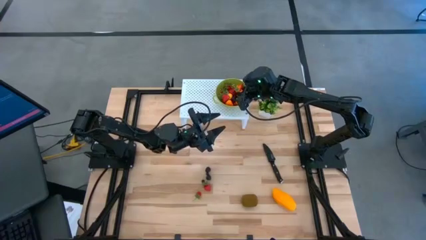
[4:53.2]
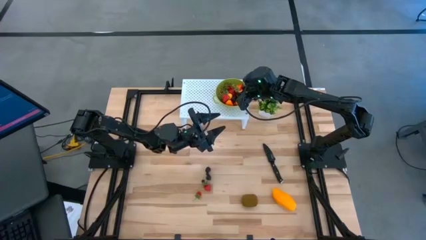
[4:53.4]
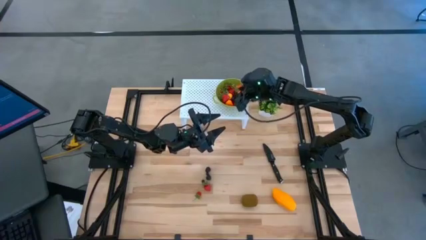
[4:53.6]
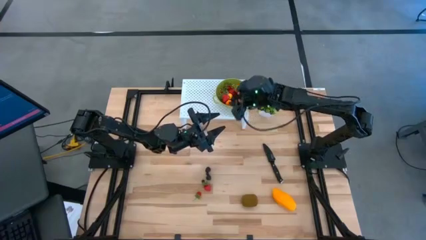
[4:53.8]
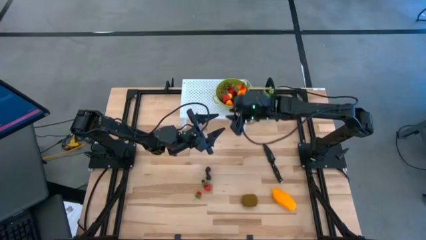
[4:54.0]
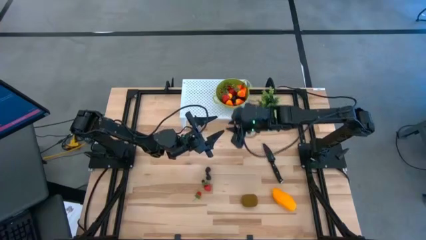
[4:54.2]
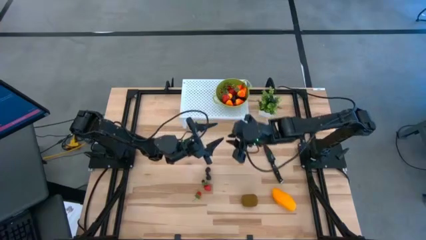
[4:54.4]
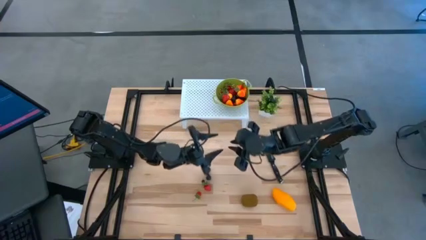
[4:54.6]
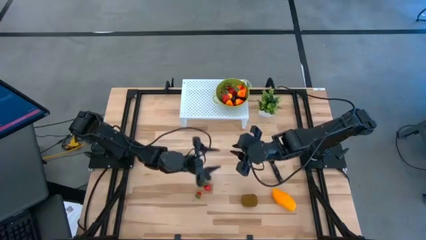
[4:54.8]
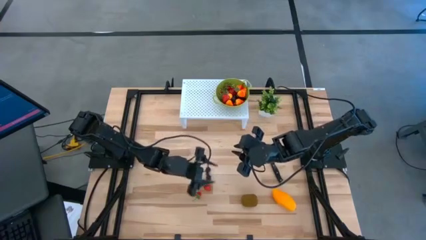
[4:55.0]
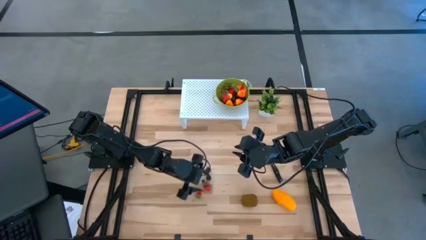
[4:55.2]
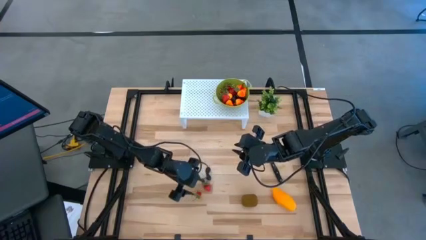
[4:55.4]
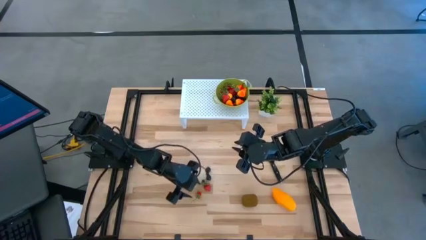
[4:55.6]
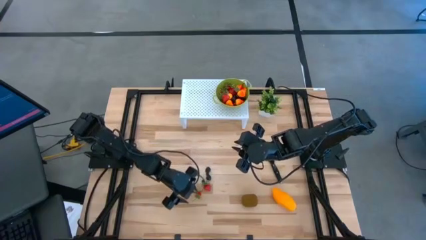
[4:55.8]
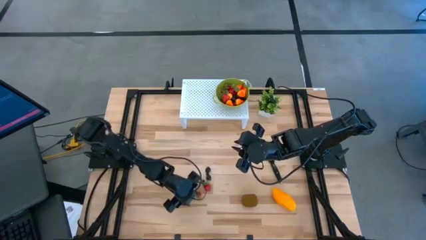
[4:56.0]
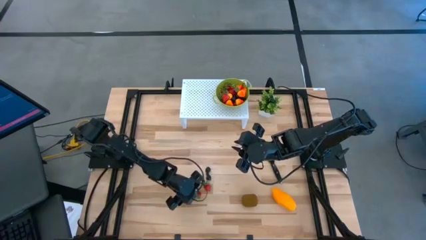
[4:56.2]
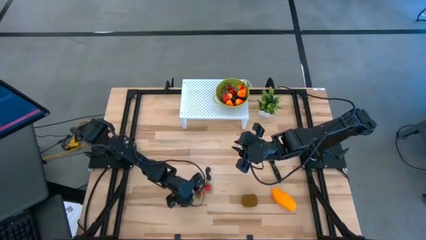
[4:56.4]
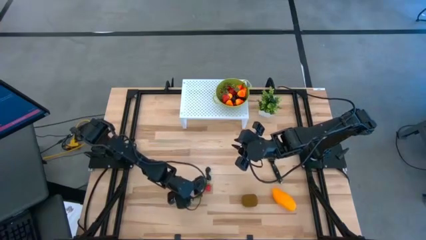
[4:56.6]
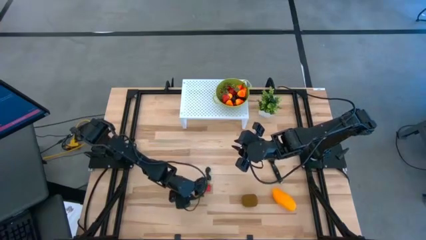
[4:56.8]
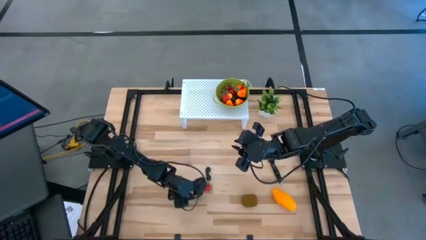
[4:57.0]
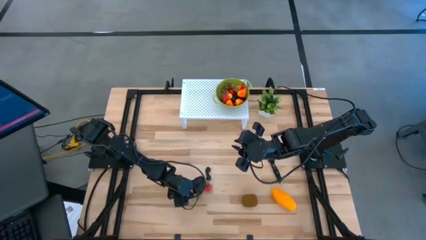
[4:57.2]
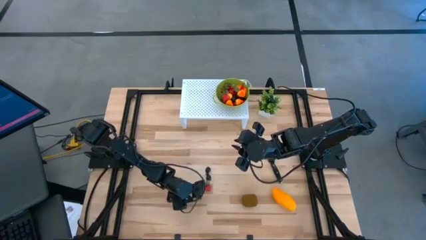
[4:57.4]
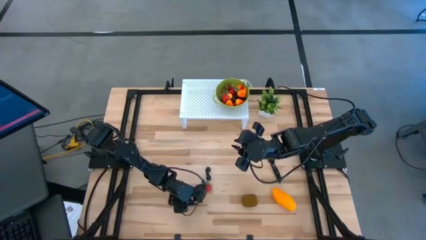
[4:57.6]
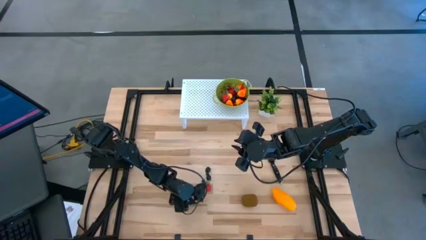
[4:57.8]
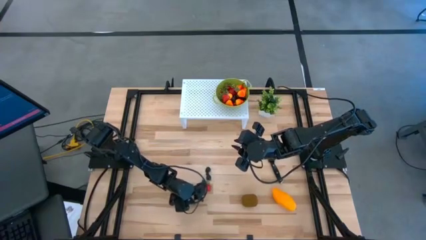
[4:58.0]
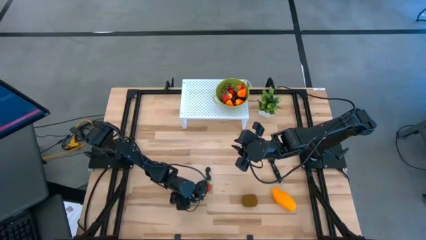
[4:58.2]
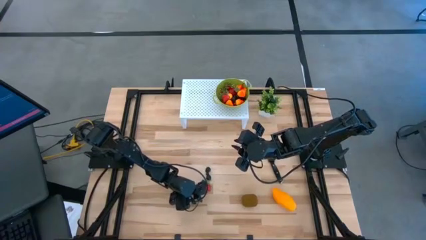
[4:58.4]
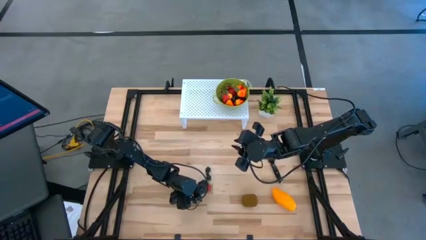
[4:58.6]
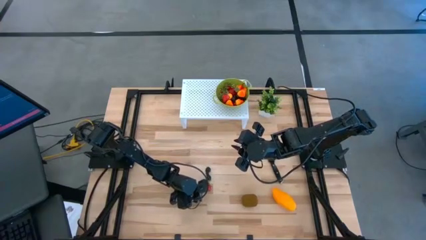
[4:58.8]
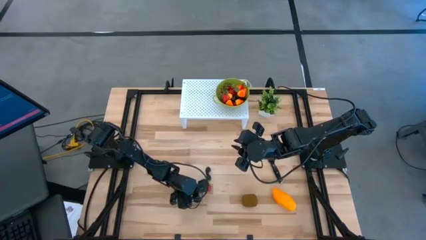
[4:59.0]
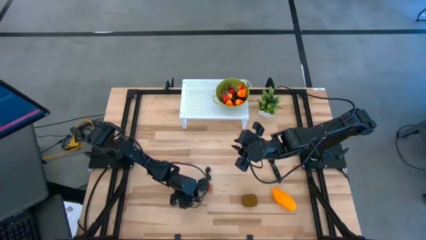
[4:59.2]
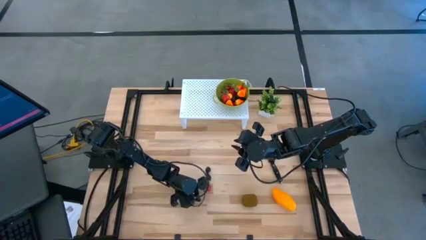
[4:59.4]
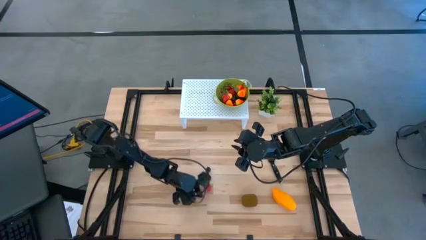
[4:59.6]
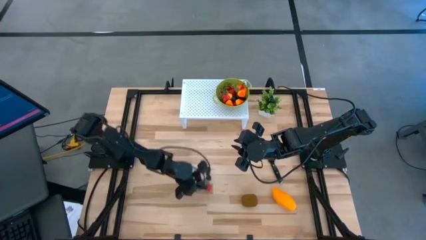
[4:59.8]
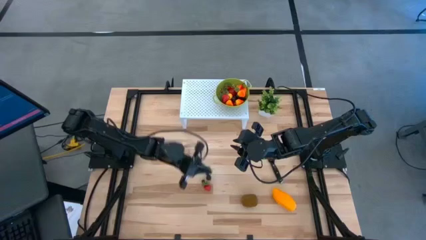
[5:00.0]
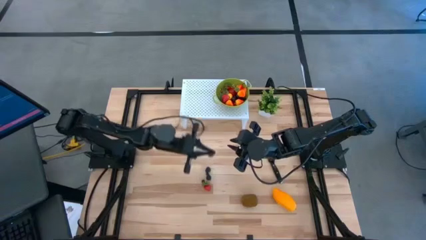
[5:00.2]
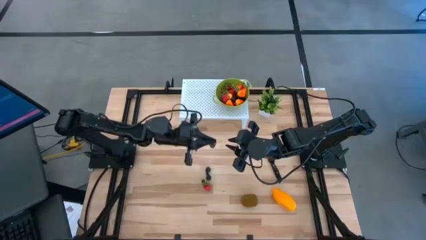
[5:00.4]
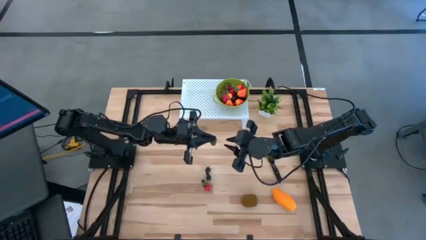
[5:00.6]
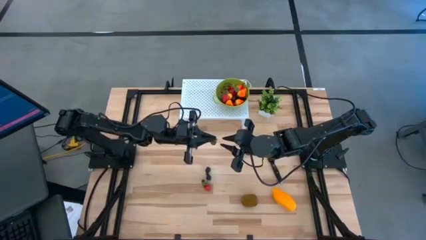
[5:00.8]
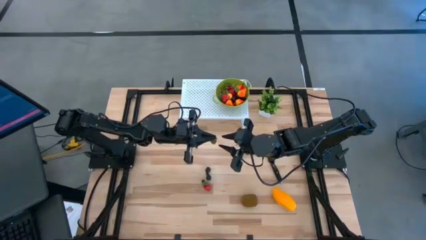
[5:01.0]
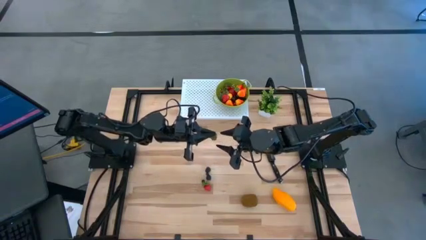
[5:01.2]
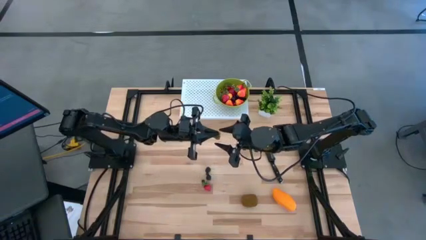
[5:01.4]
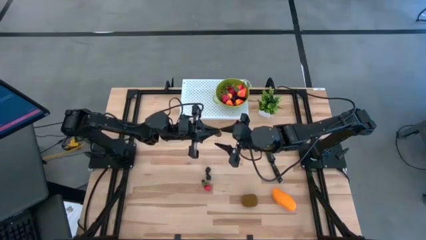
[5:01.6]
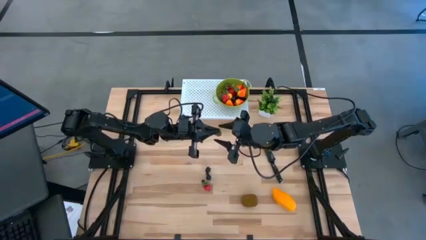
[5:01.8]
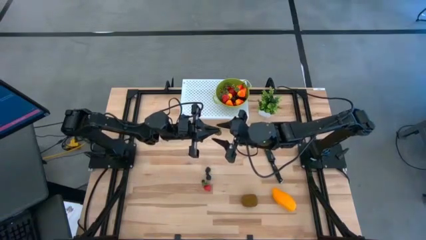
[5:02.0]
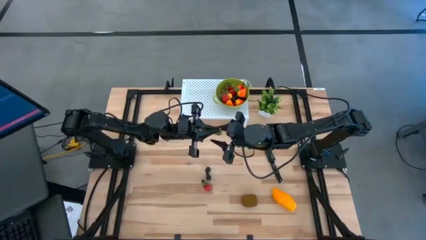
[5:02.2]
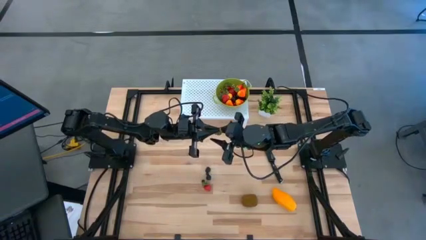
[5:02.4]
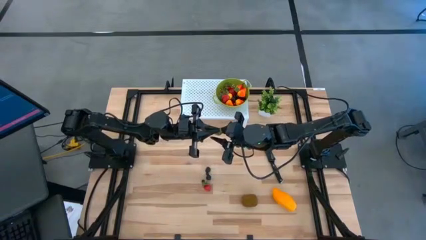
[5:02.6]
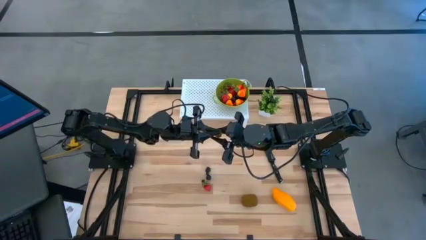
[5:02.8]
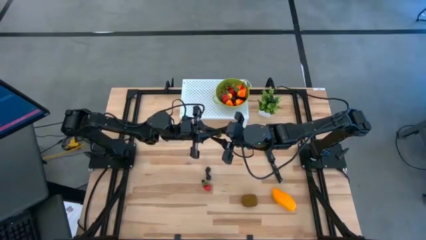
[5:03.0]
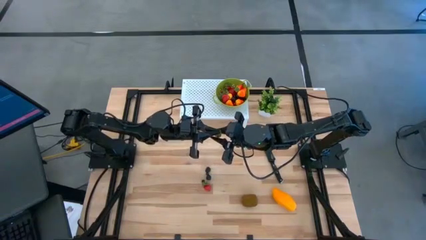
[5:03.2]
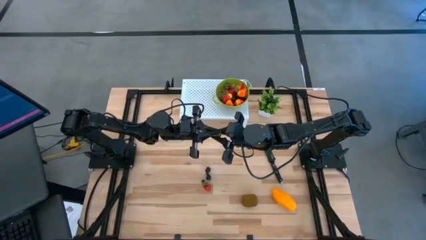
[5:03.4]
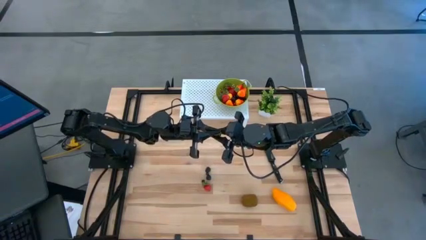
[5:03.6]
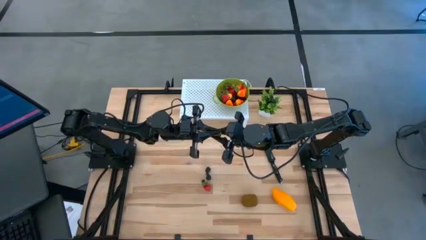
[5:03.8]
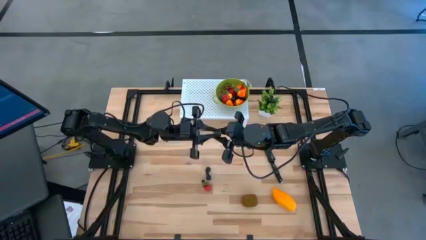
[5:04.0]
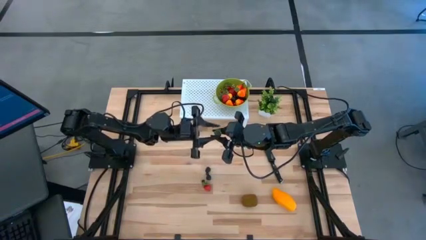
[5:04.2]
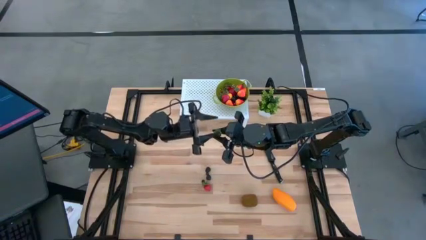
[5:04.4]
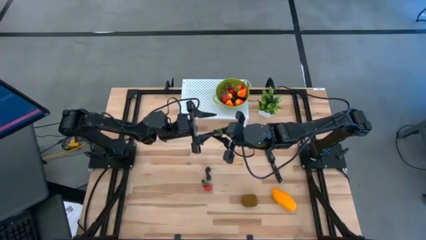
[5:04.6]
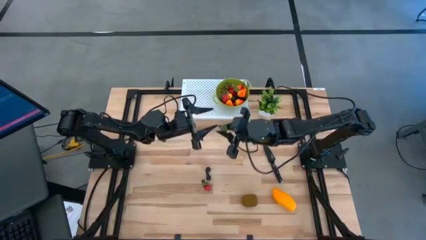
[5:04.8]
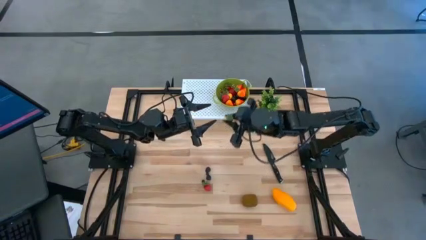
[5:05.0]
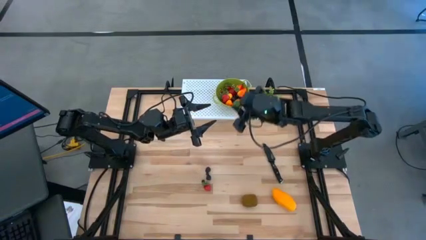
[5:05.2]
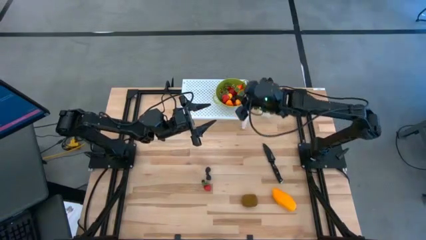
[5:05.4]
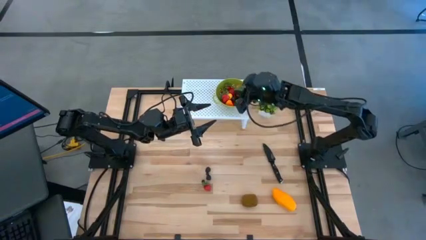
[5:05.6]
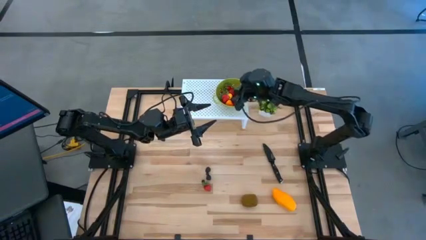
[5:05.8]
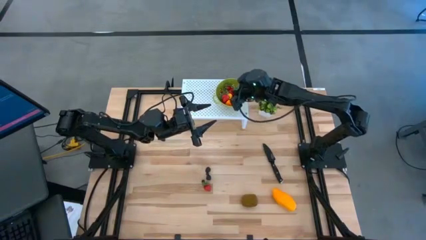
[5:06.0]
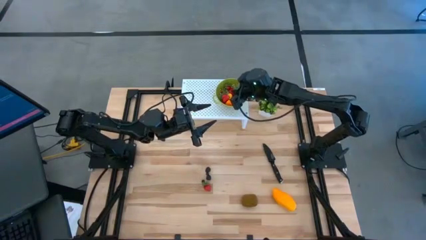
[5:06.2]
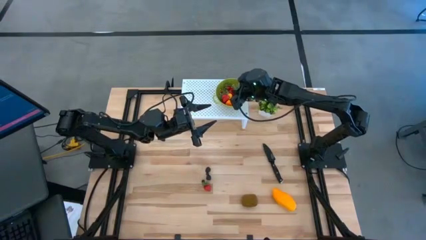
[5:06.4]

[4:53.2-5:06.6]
Task: Pick & Place Fruit
Put the red strawberry into the green strainer bowl
